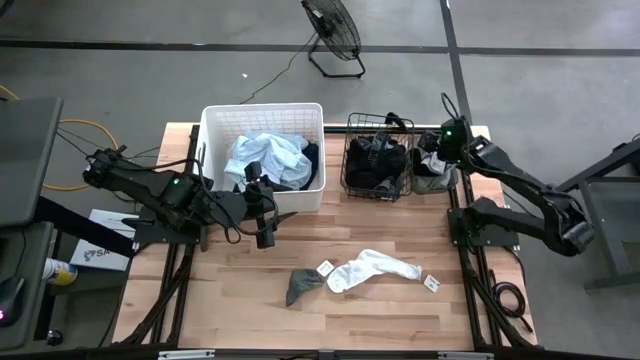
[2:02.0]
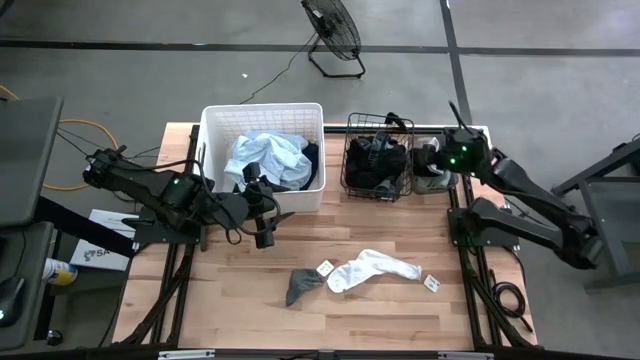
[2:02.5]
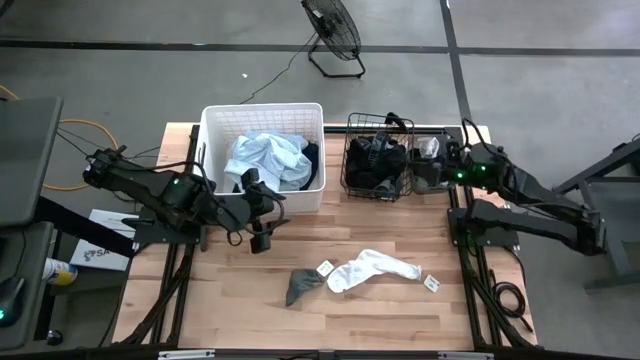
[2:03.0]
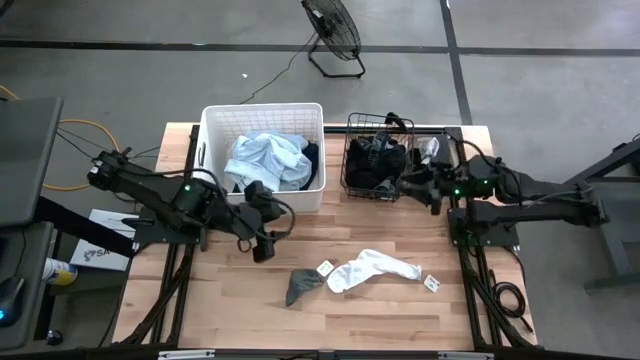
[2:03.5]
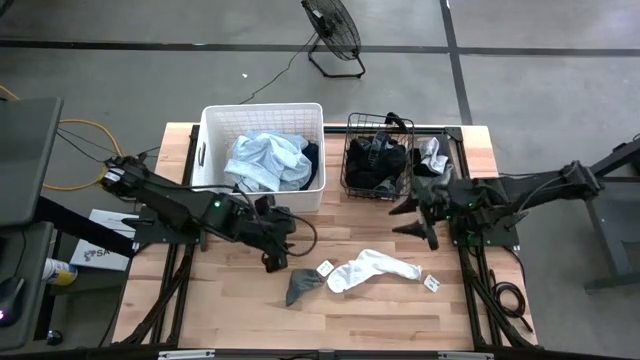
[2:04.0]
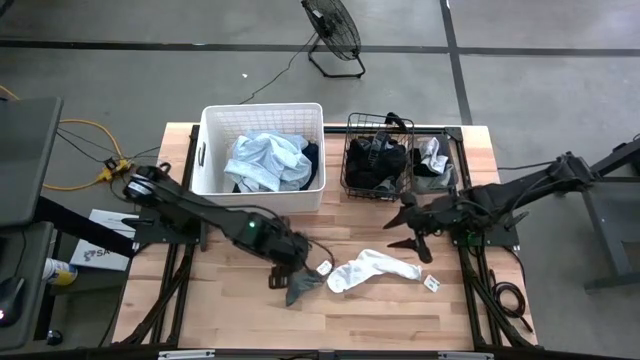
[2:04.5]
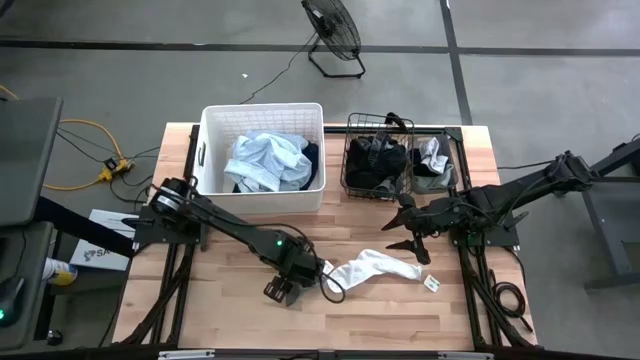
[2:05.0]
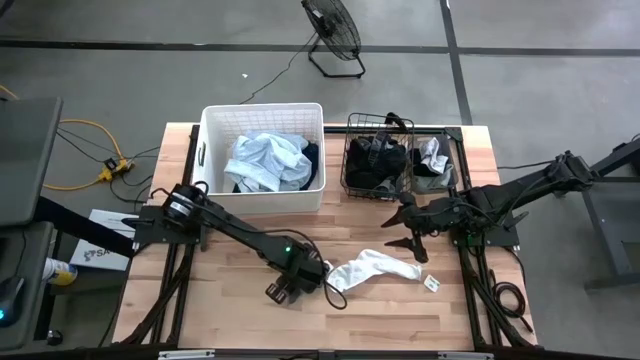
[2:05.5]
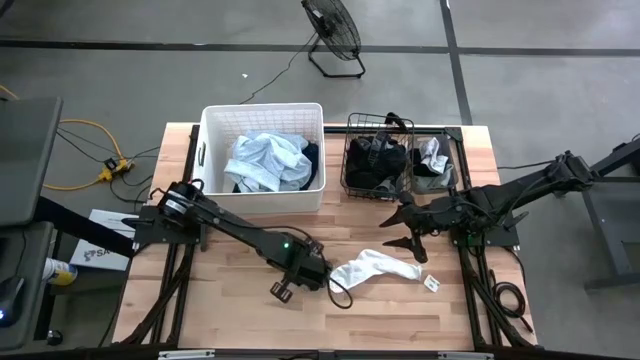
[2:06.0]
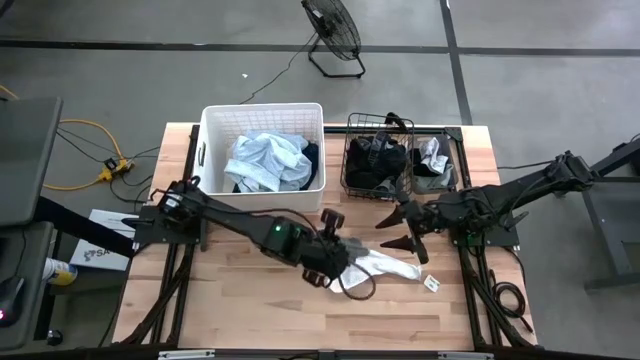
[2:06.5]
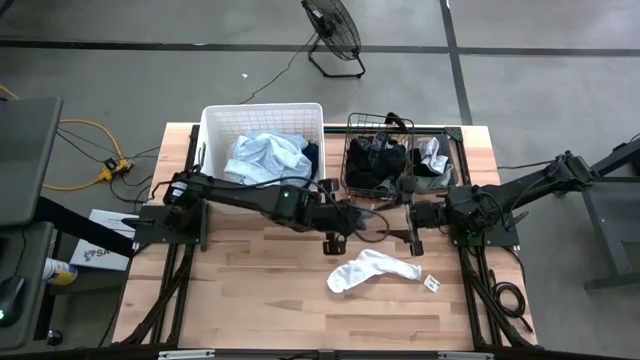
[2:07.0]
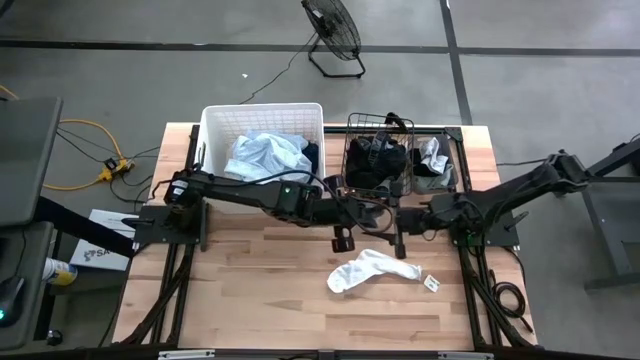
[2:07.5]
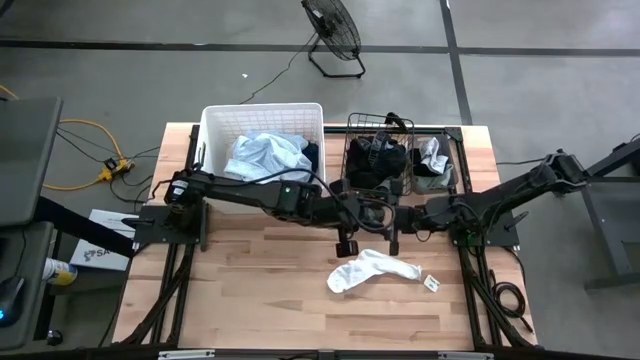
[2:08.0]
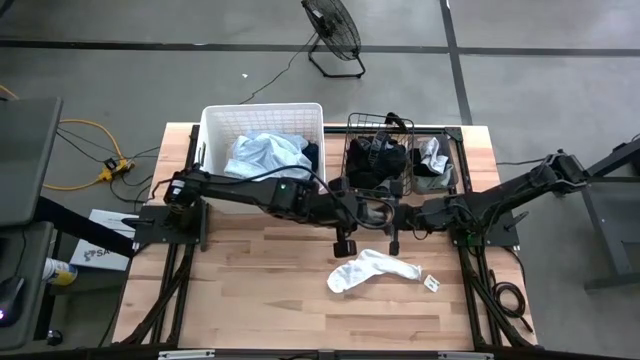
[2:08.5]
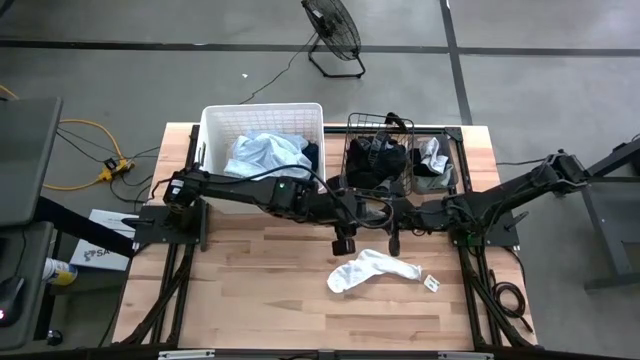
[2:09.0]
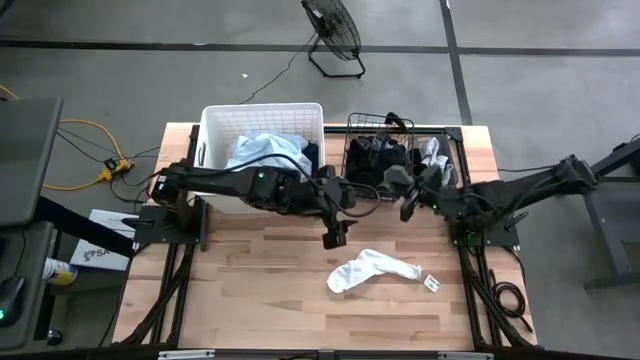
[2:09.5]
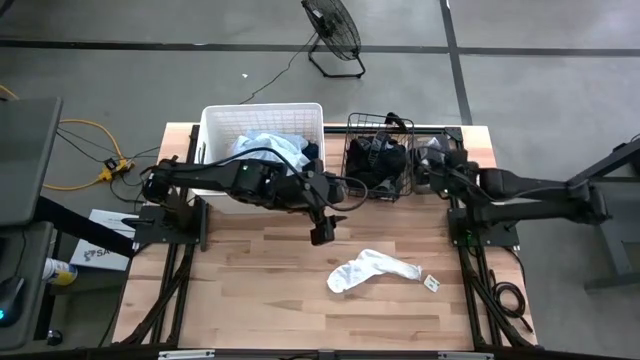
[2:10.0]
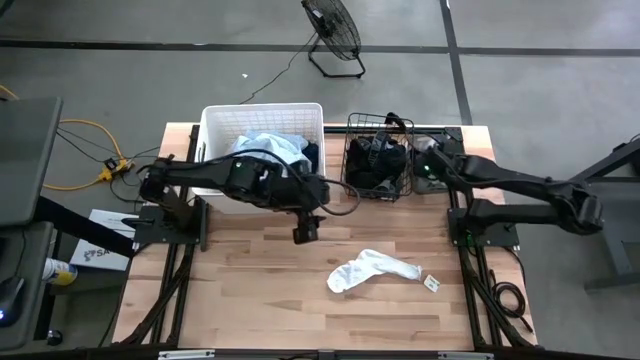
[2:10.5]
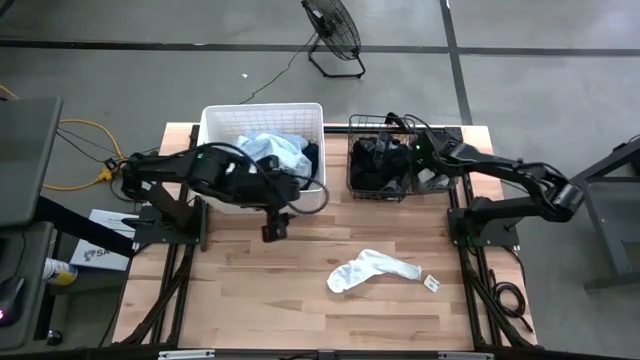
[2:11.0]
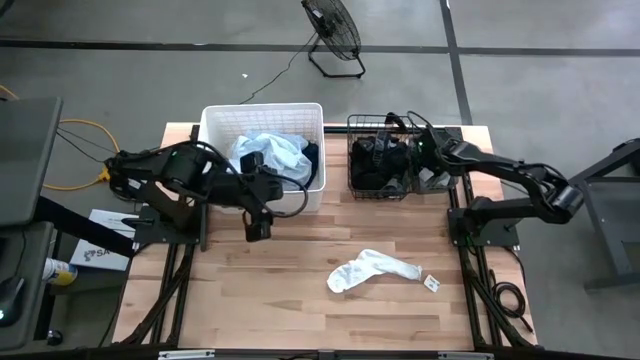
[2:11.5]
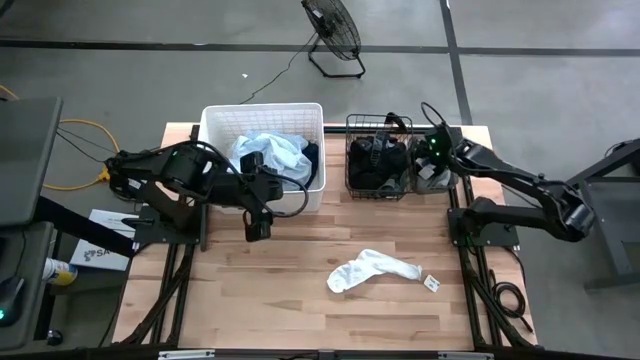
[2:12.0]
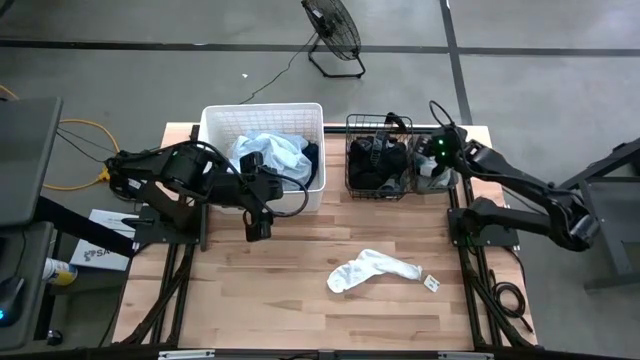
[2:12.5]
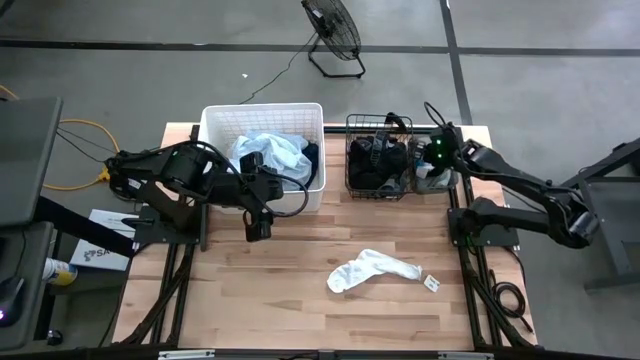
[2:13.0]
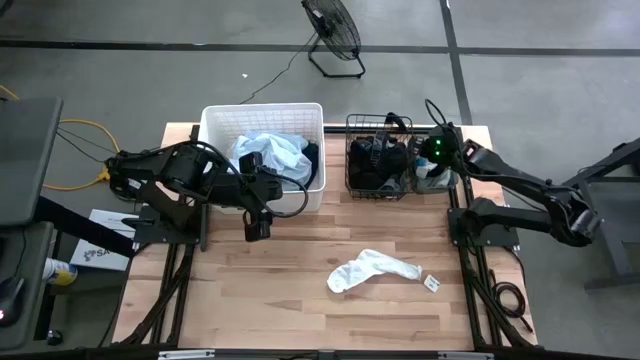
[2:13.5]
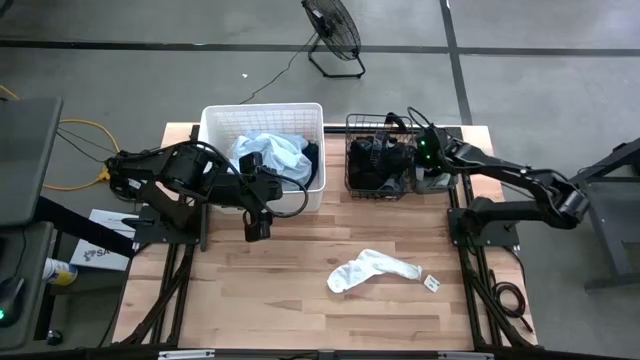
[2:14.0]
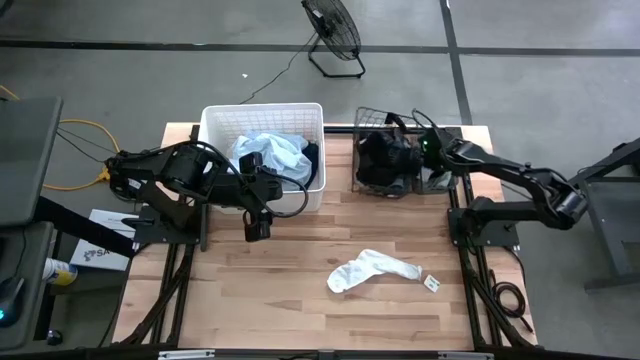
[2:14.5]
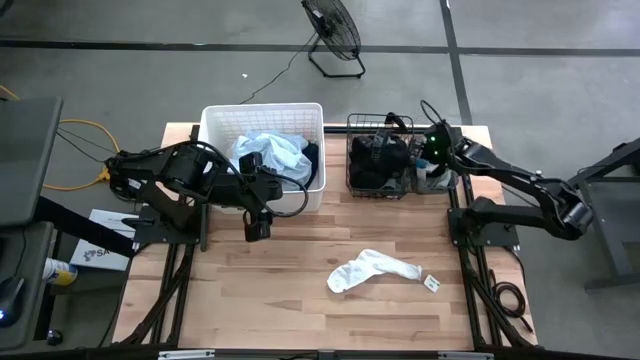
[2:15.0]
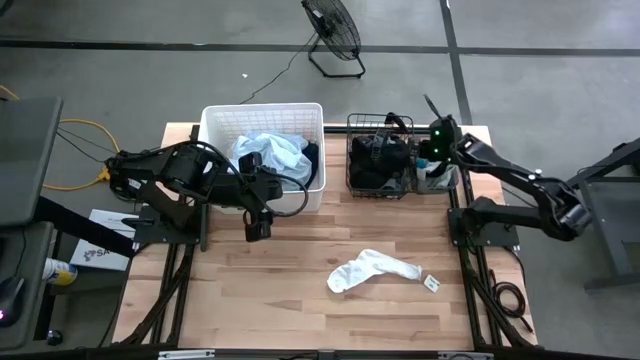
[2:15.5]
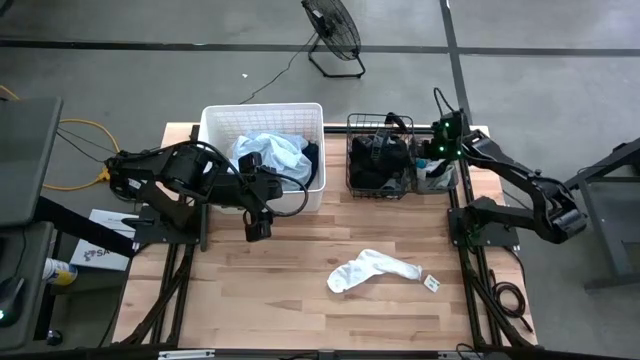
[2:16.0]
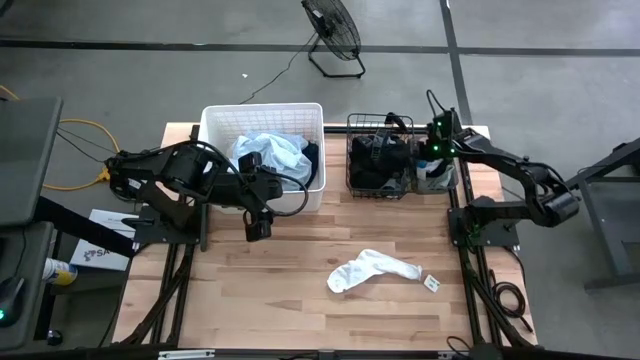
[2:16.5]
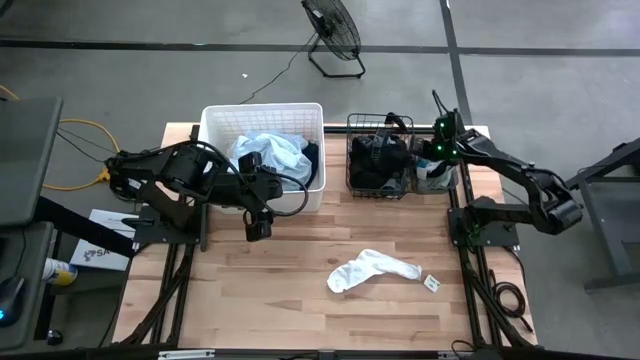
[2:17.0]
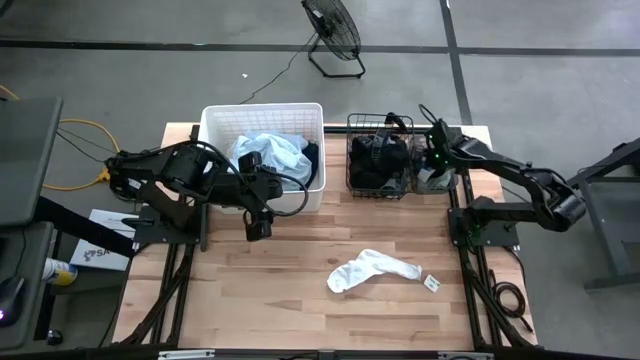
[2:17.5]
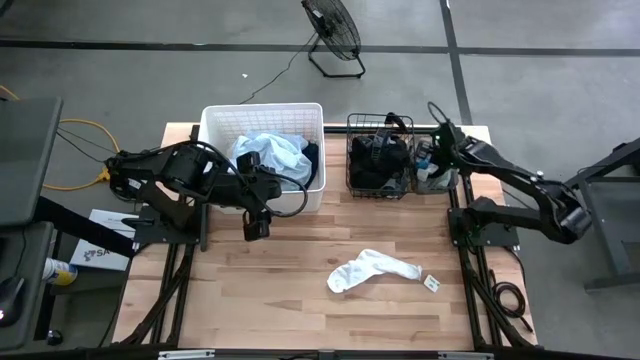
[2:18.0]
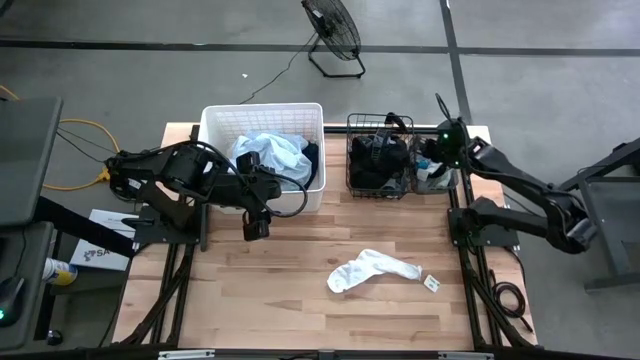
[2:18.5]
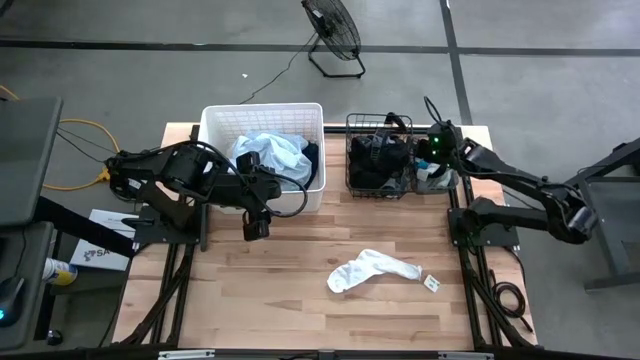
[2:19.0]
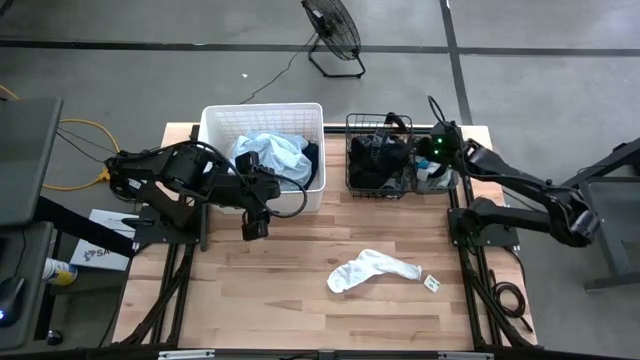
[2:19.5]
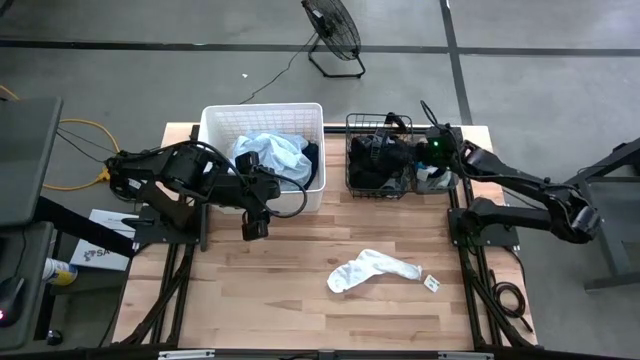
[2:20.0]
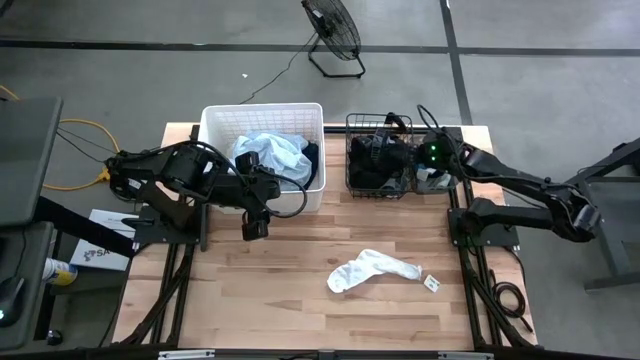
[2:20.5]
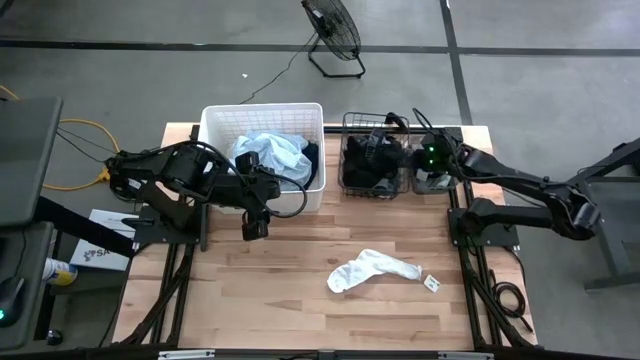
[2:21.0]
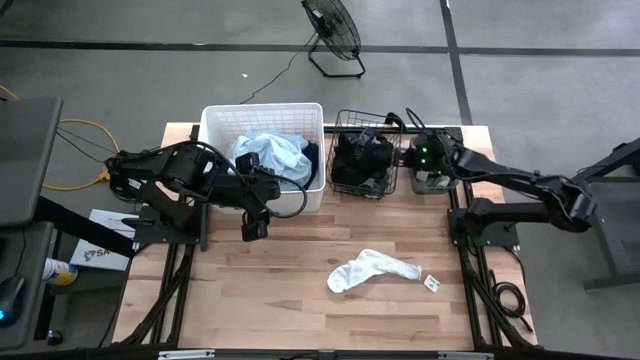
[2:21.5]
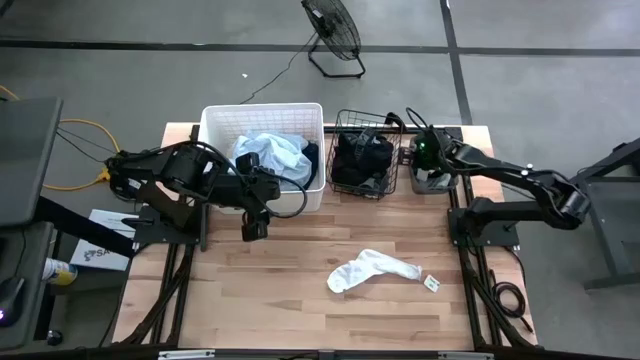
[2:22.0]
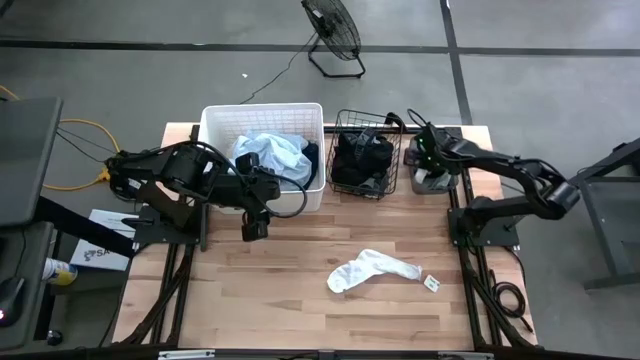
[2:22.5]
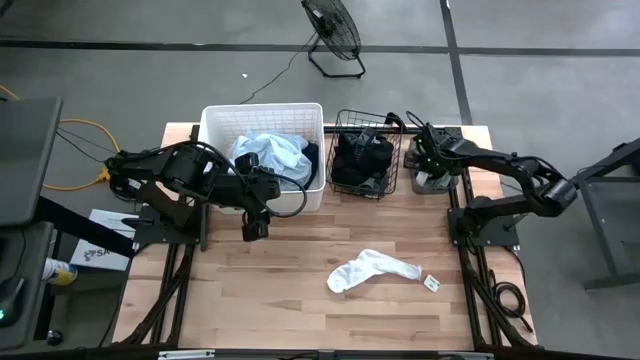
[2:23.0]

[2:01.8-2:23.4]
Task: Pick & Place Cloths
Put the dark gray sock into the black bin
